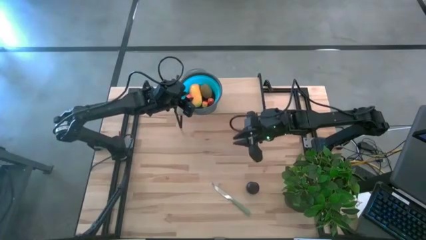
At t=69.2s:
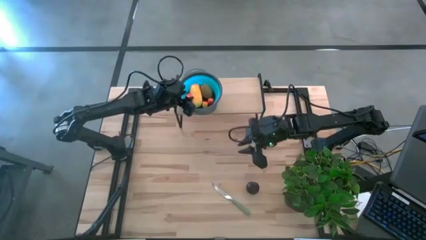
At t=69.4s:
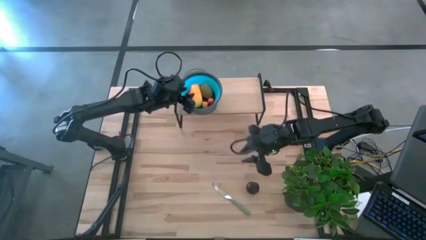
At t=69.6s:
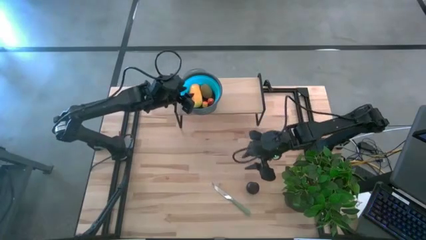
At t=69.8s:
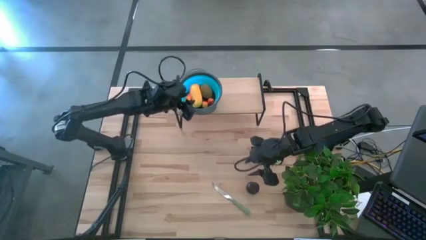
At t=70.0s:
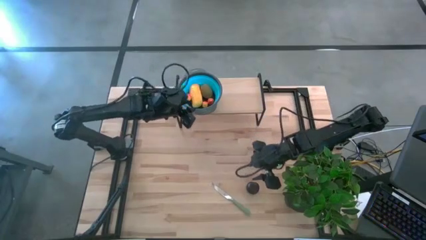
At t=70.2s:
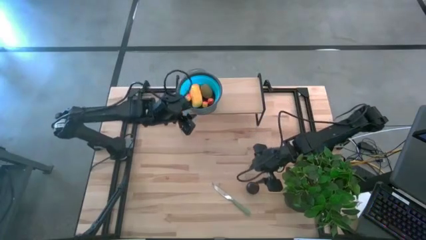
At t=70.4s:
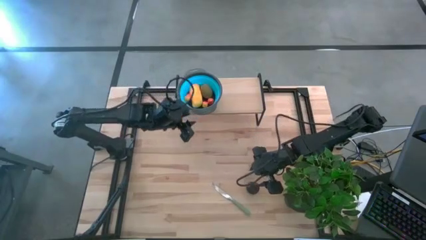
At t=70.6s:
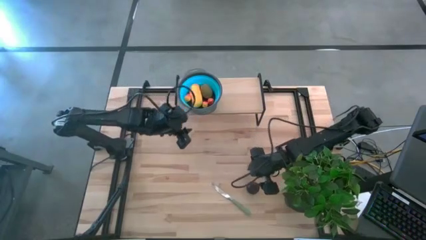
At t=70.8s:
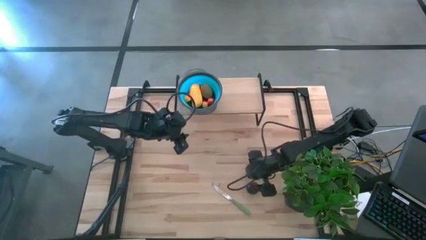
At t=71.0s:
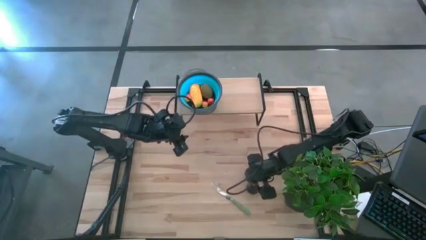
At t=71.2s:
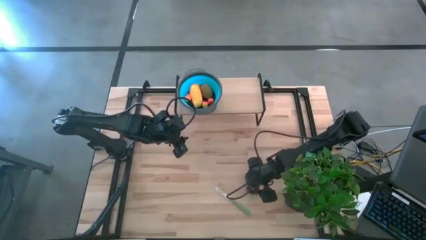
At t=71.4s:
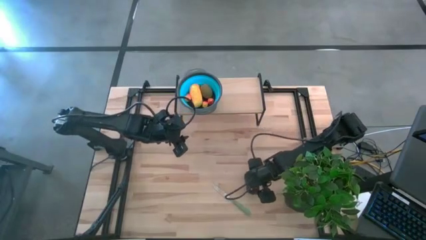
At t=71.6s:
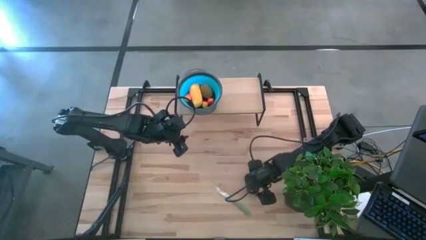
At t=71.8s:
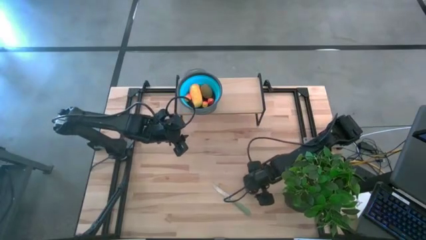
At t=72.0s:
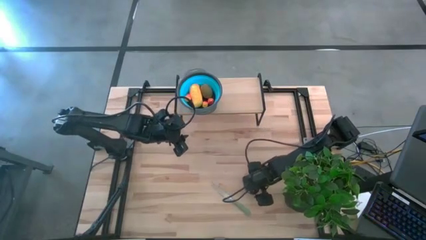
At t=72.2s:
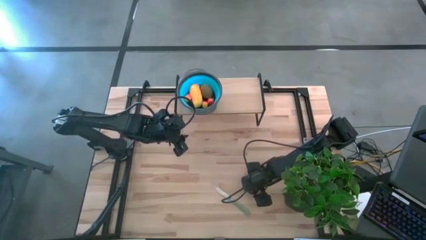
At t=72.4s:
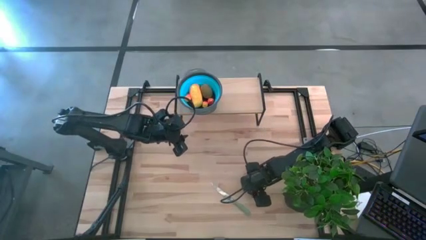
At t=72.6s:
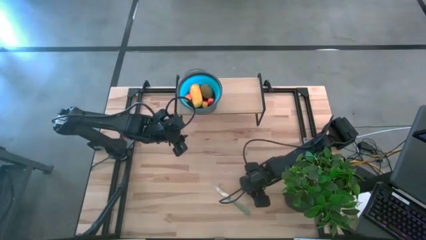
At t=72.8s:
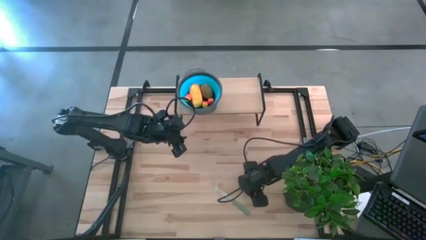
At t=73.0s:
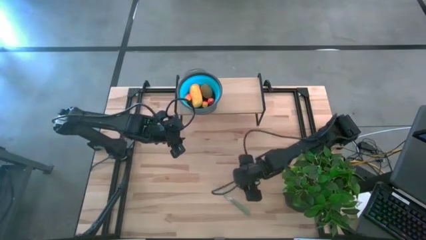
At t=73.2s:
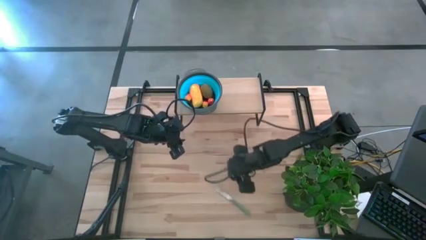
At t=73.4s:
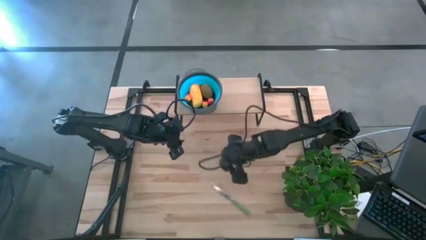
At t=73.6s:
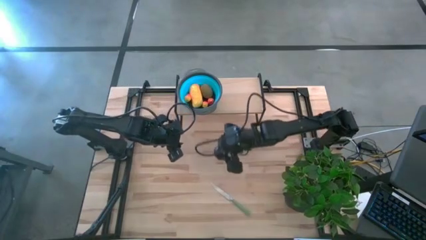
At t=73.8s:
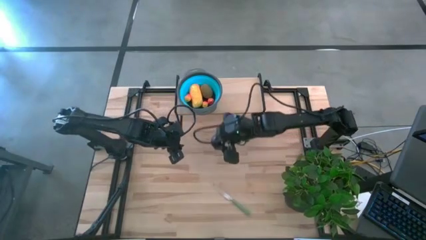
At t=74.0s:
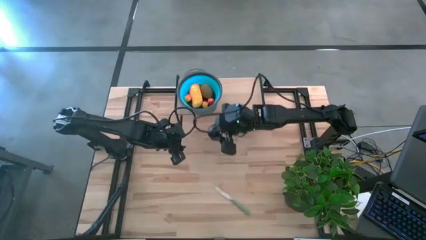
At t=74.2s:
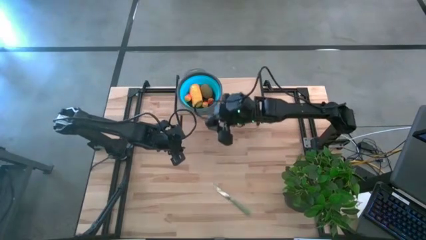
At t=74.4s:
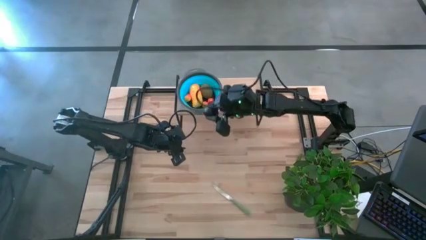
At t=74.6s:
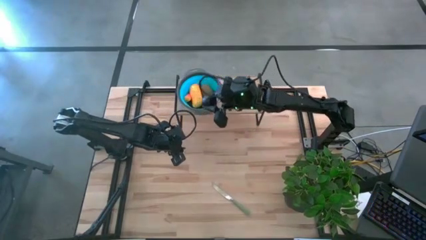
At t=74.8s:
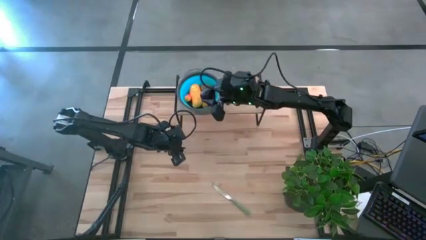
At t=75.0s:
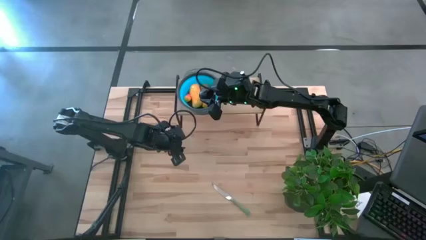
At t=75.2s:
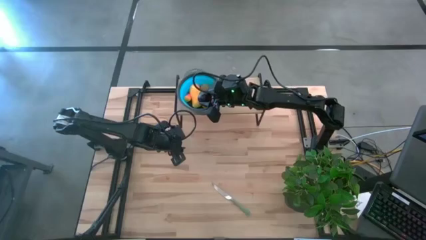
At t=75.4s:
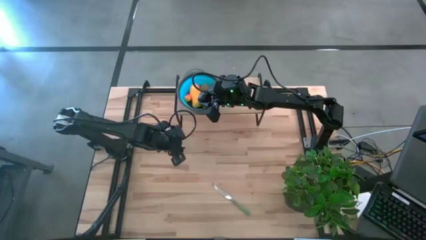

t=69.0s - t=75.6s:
Task: Pick & Place Fruit
Put the plum into the blue strainer bowl on the shelf

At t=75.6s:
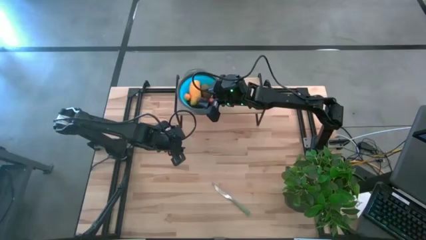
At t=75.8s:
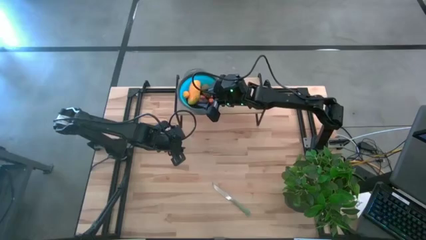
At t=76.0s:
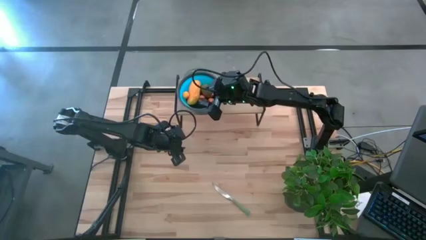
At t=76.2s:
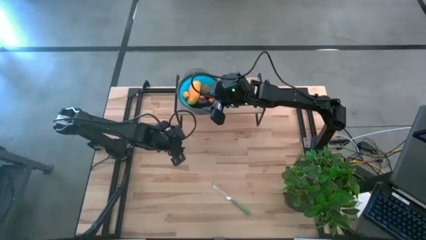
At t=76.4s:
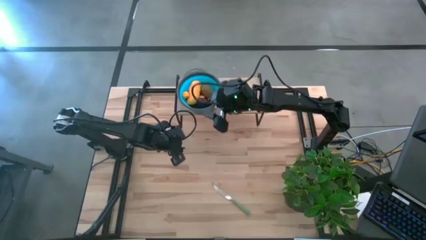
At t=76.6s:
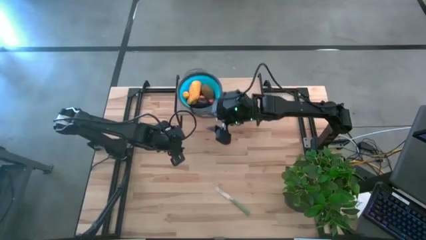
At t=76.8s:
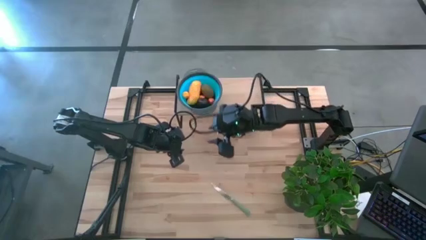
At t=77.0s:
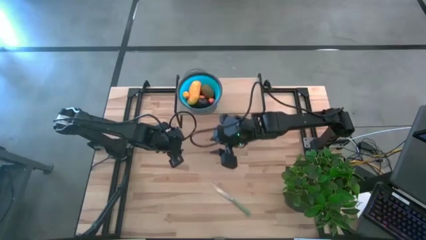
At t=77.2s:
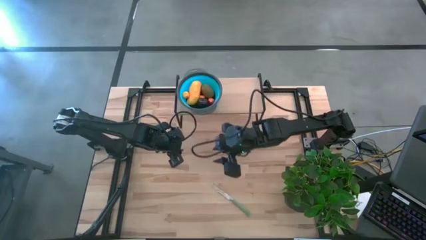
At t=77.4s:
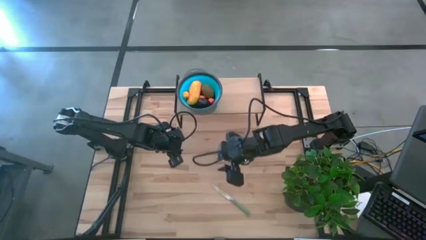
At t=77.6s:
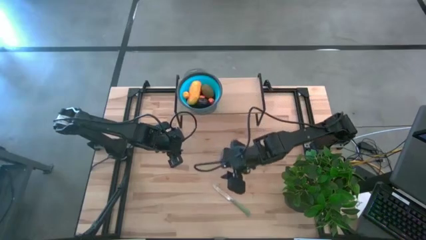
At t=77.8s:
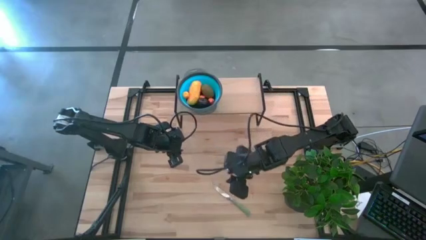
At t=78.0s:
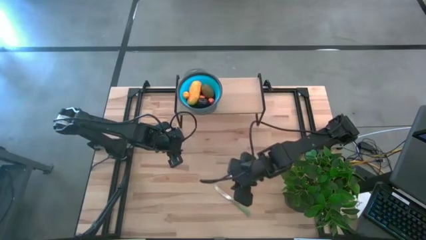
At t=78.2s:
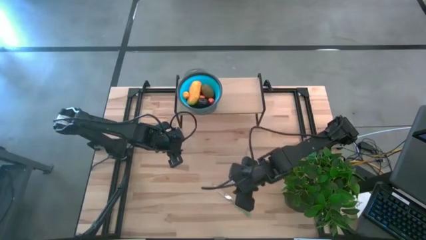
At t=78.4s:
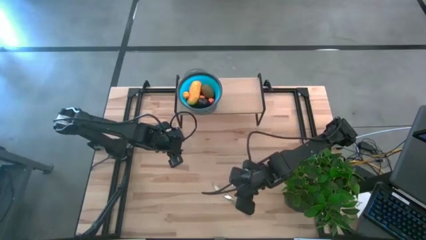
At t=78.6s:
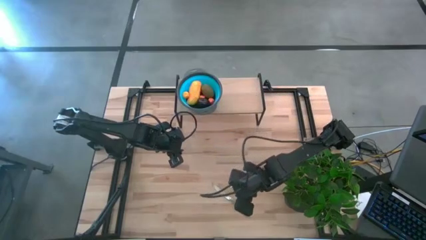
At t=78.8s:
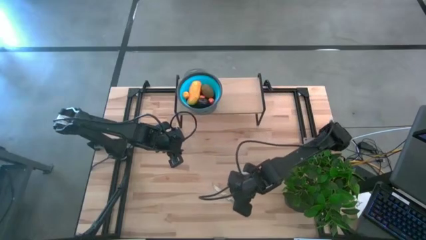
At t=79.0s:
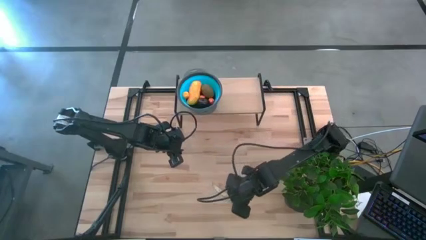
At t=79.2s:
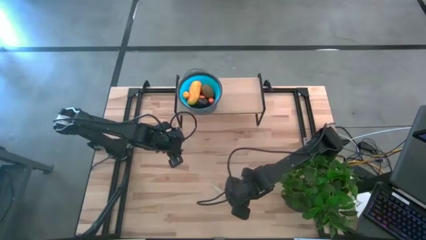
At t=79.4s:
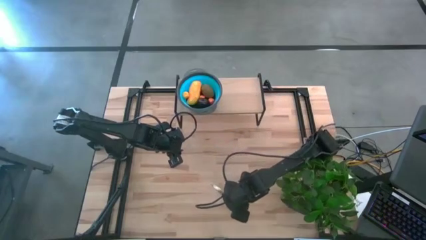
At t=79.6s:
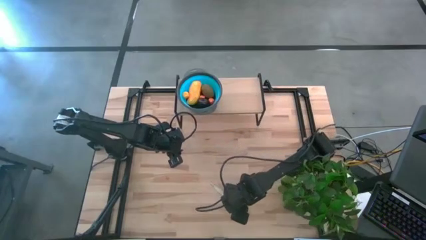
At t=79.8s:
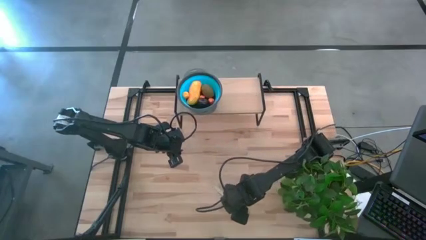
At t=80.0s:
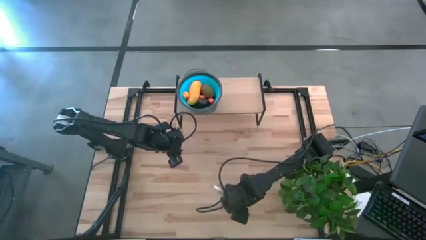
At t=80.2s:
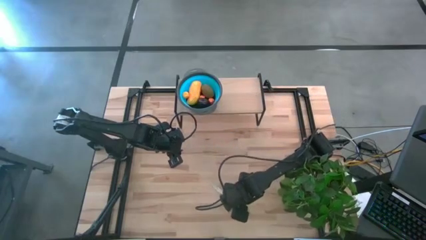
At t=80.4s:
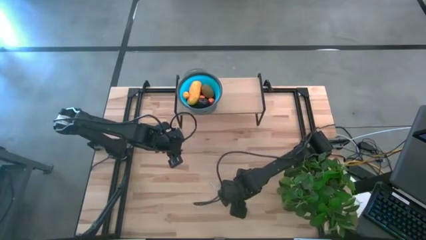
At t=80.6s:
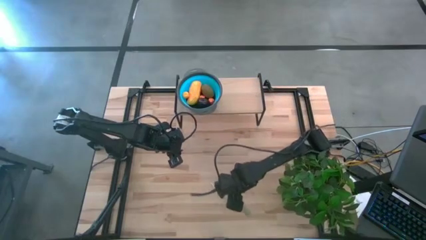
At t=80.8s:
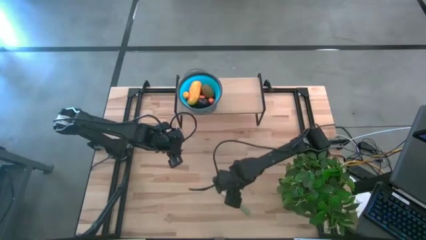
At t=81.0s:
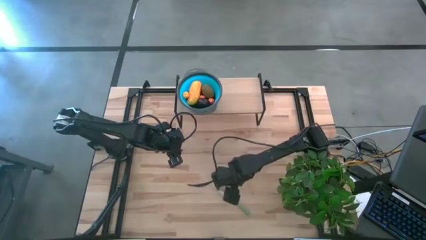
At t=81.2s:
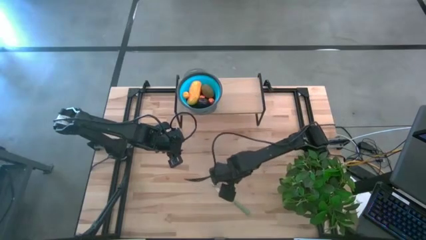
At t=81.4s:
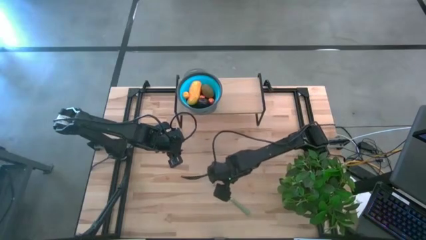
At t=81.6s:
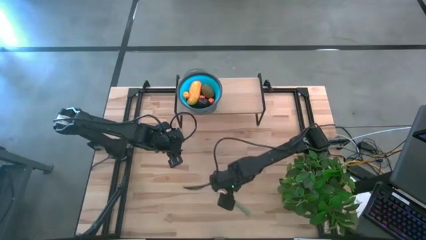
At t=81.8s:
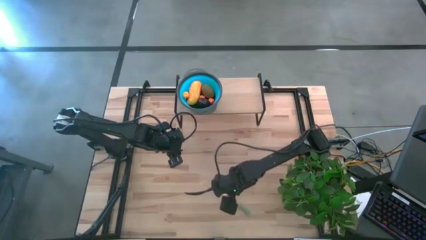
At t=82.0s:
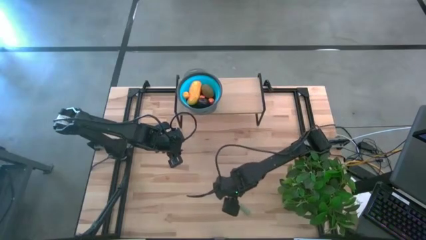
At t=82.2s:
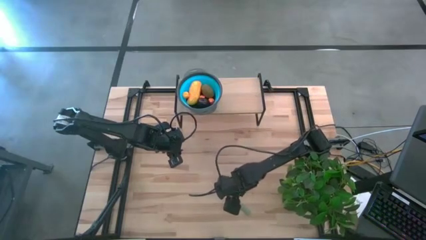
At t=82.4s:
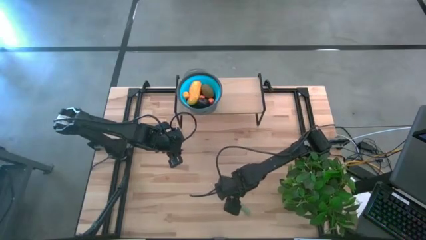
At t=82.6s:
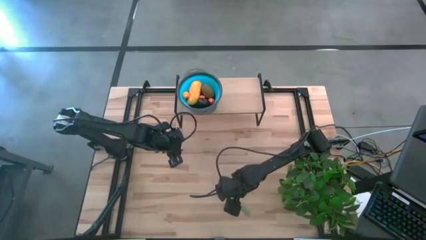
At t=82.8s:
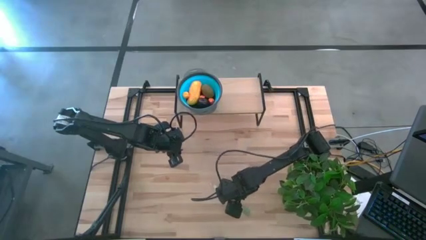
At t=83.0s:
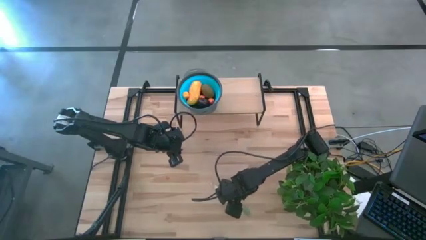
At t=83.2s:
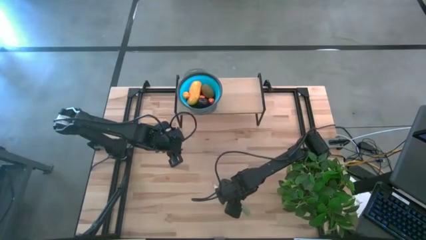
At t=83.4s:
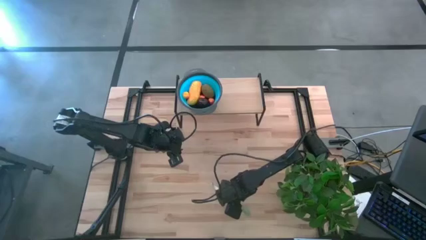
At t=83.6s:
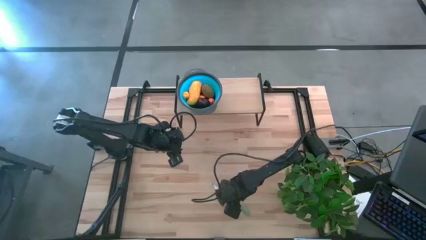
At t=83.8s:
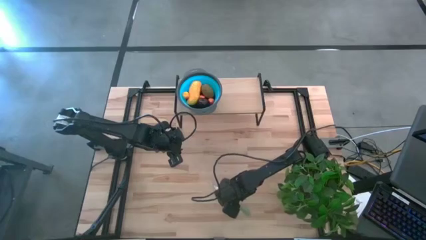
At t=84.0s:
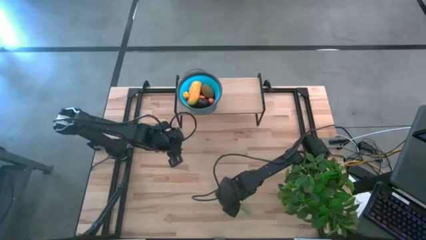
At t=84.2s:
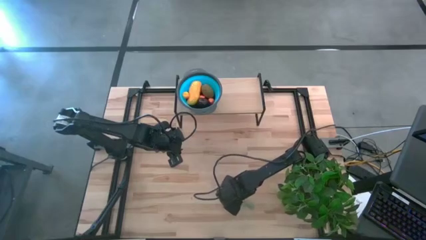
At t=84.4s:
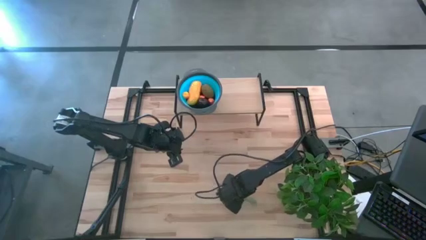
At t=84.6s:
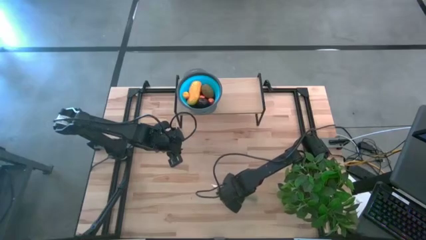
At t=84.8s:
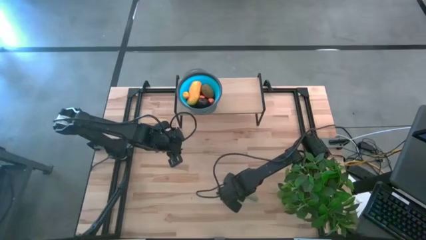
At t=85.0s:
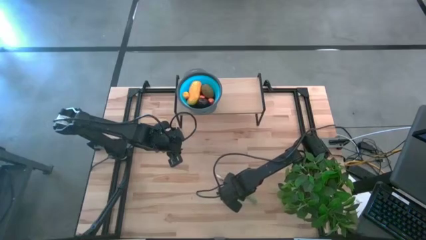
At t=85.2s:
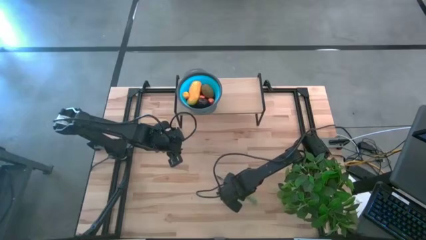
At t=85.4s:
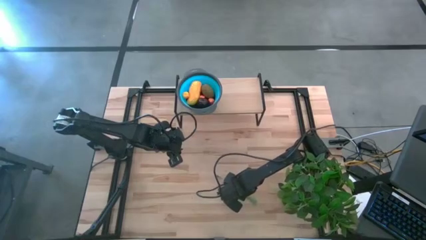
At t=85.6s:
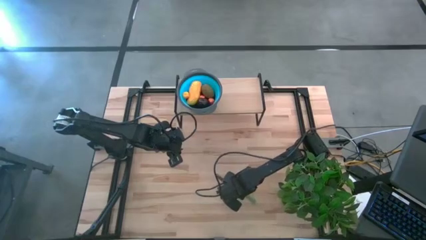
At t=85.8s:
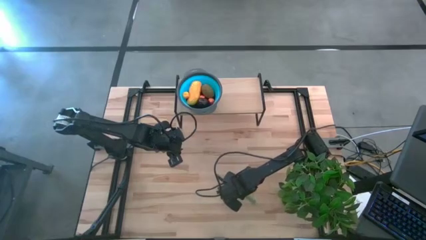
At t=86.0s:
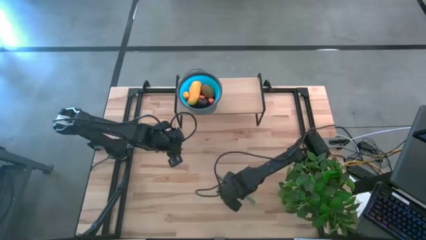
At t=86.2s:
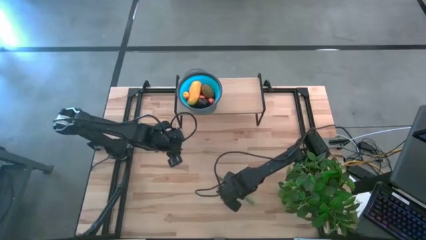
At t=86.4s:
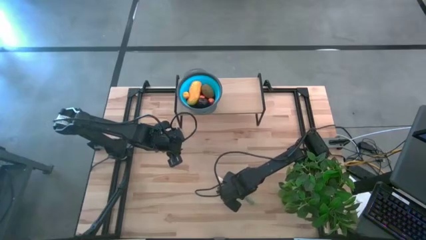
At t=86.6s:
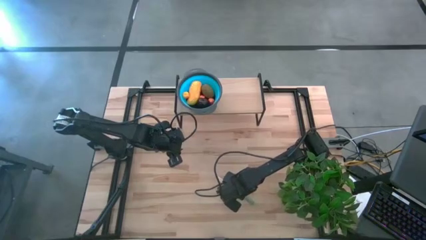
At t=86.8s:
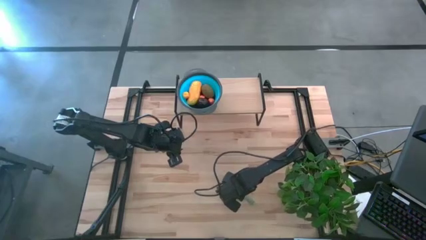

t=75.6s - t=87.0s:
Put the table knife on the shelf
